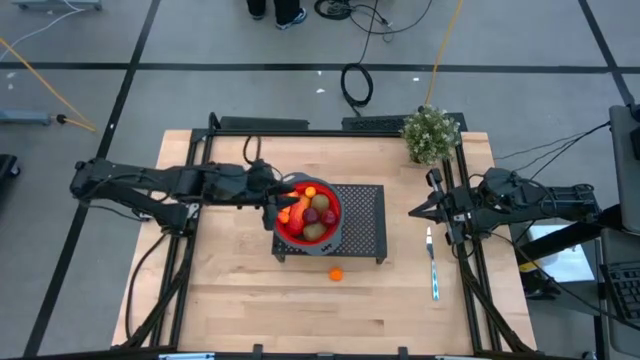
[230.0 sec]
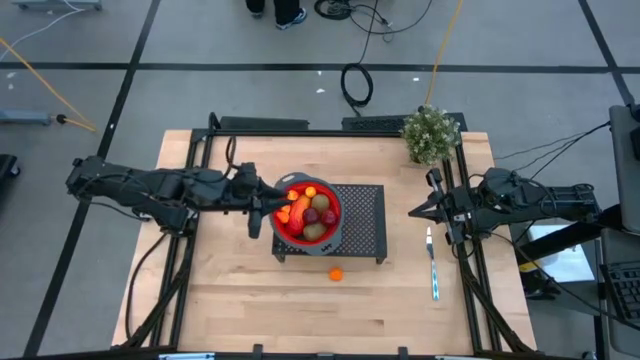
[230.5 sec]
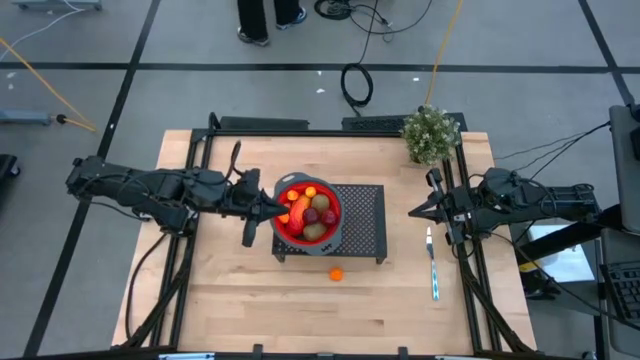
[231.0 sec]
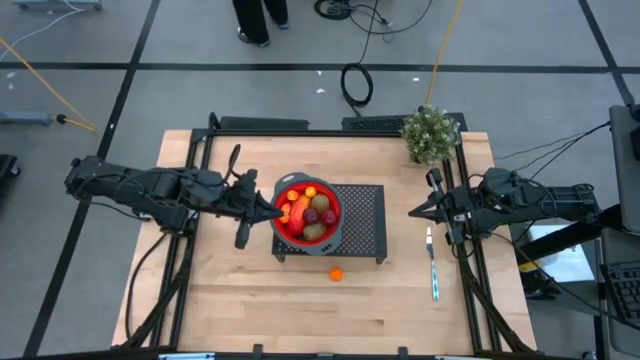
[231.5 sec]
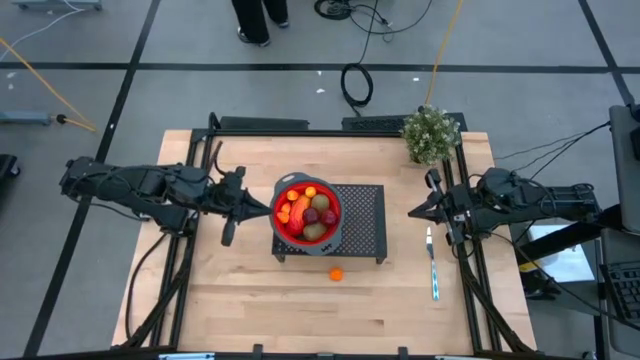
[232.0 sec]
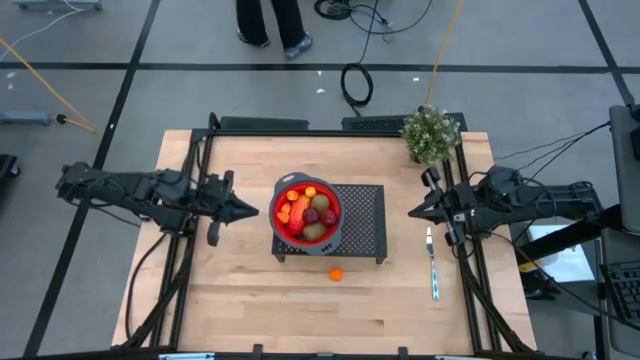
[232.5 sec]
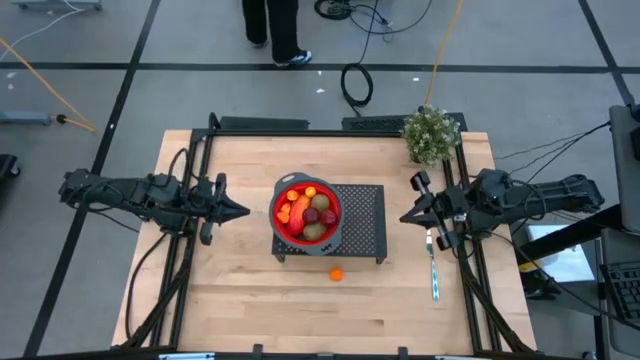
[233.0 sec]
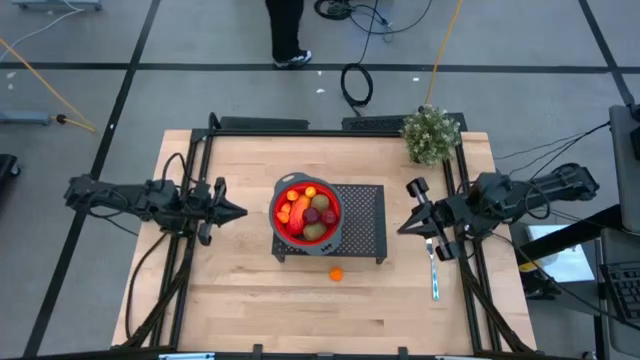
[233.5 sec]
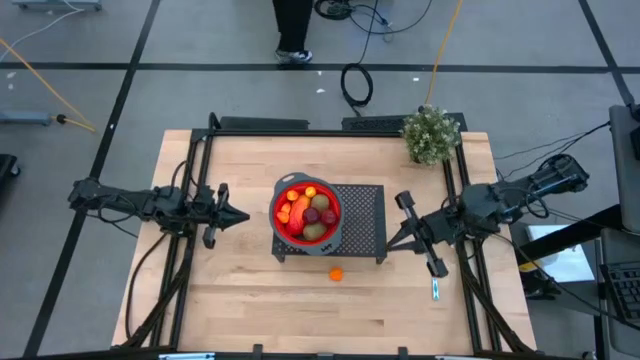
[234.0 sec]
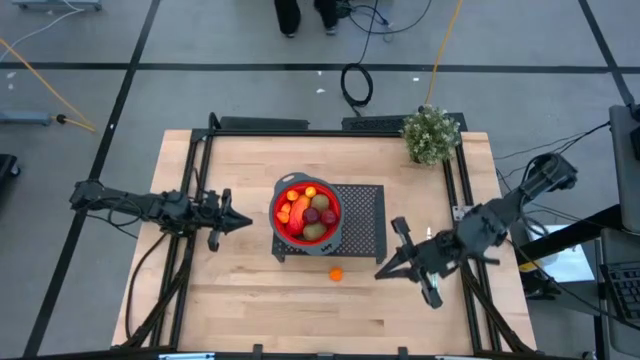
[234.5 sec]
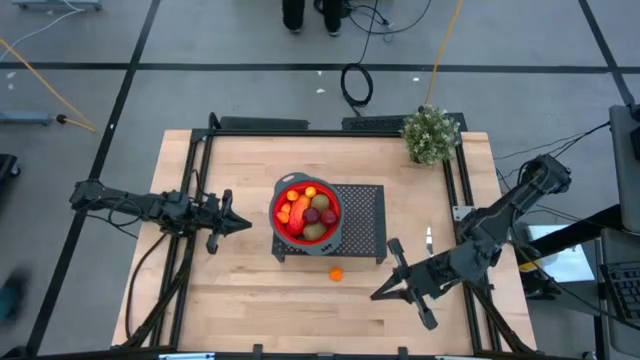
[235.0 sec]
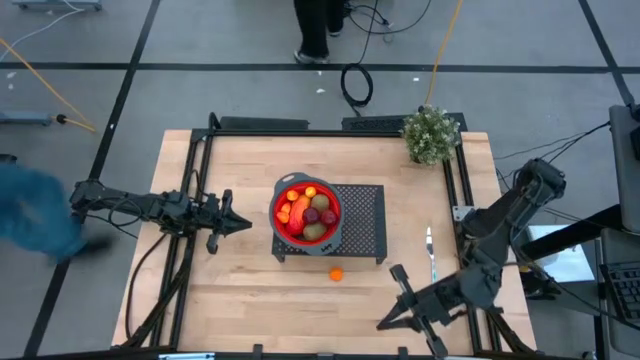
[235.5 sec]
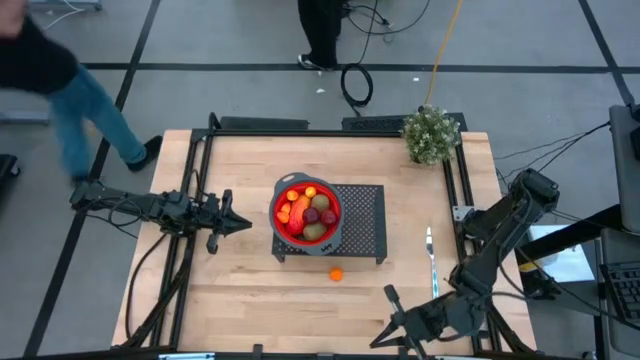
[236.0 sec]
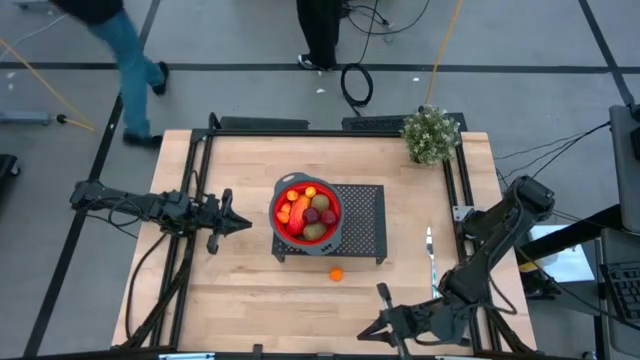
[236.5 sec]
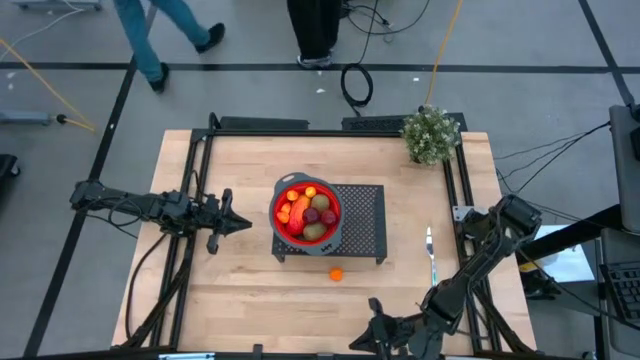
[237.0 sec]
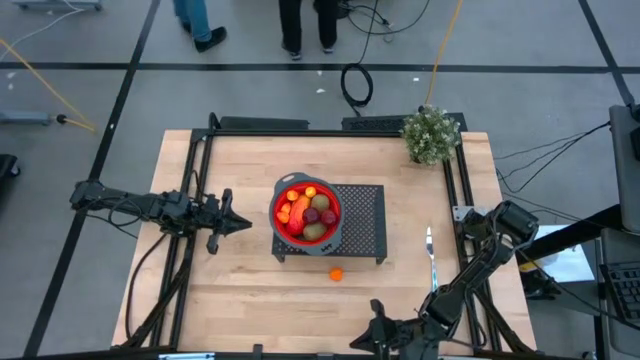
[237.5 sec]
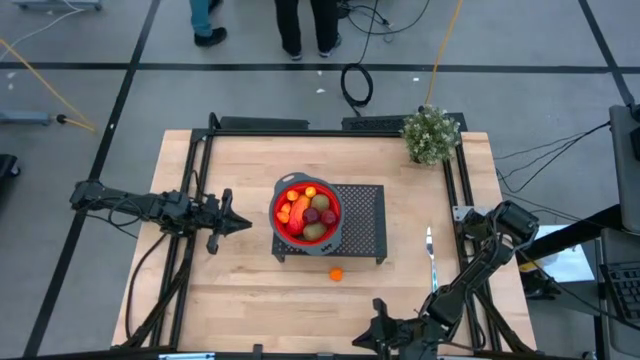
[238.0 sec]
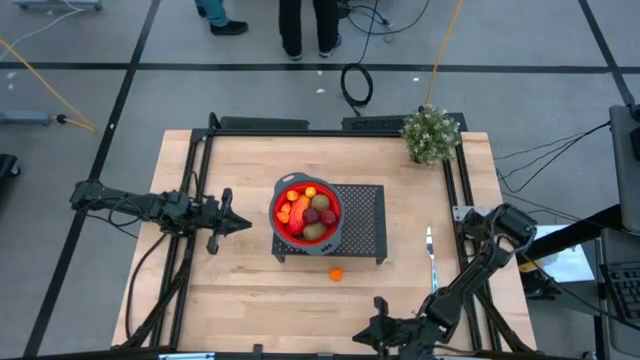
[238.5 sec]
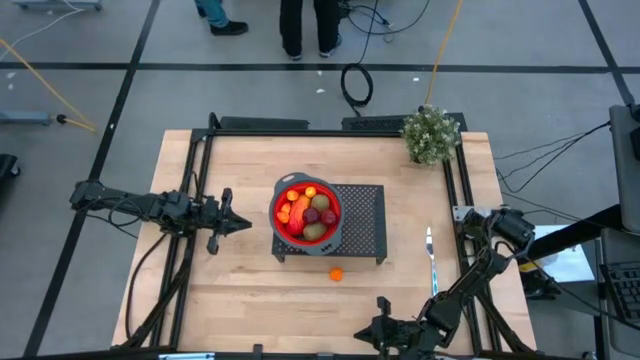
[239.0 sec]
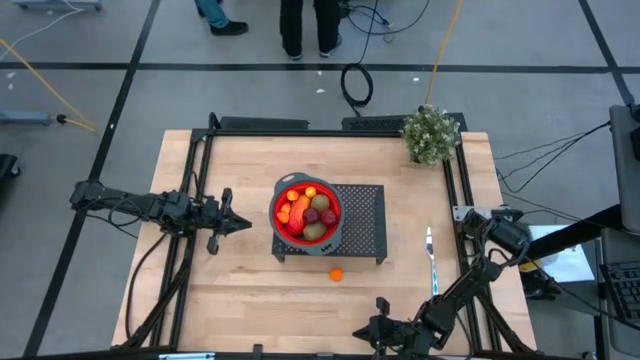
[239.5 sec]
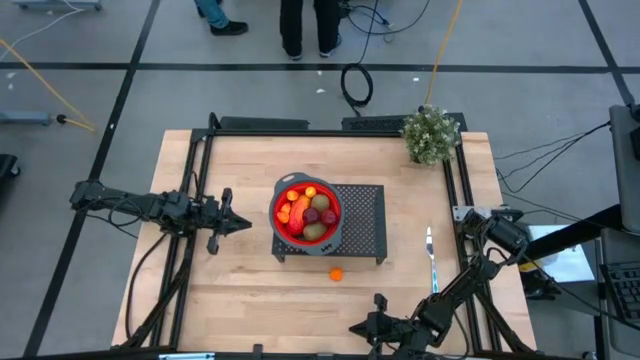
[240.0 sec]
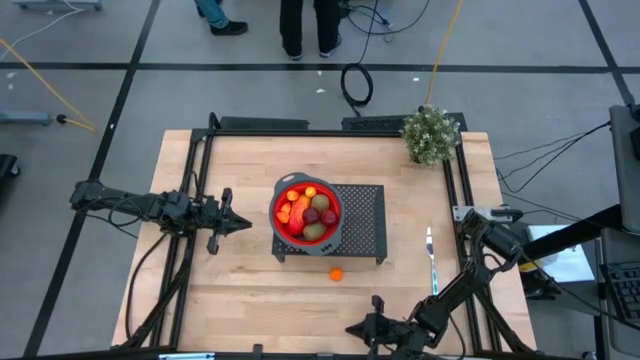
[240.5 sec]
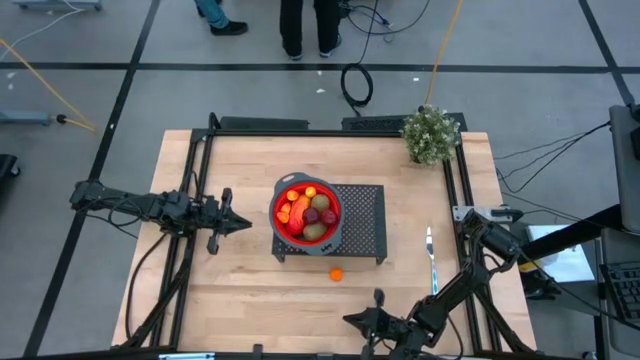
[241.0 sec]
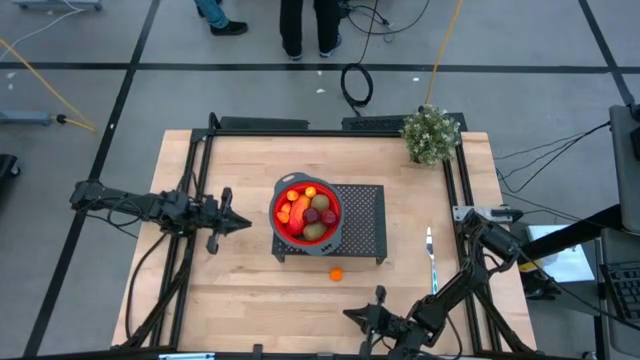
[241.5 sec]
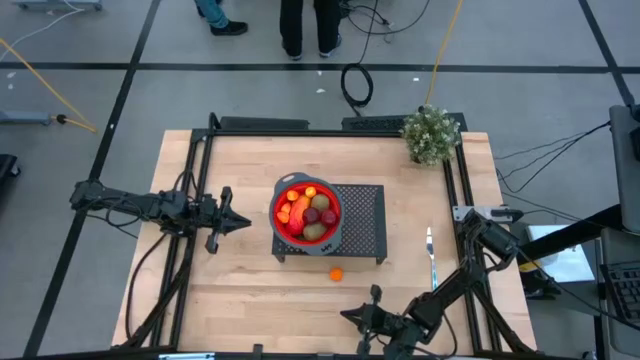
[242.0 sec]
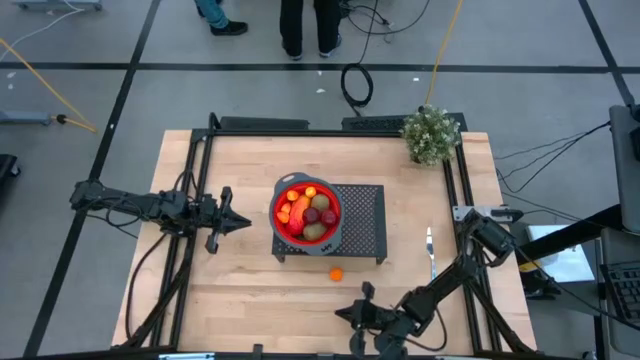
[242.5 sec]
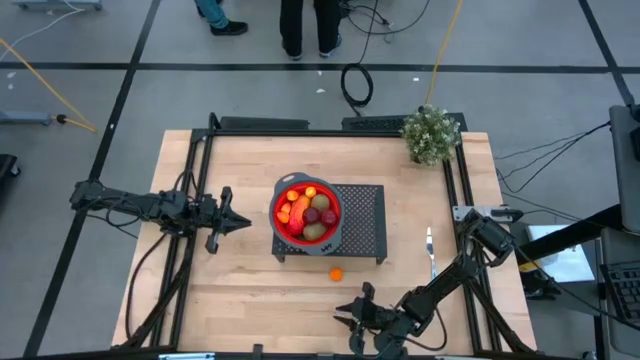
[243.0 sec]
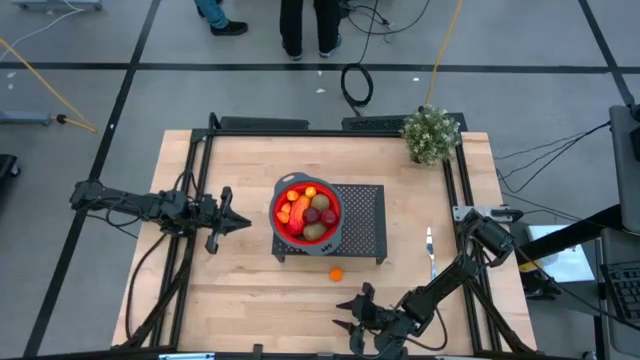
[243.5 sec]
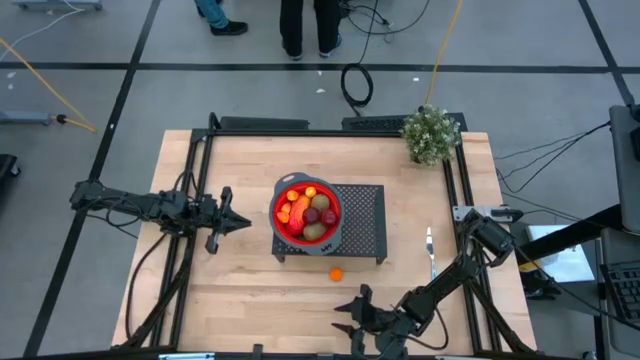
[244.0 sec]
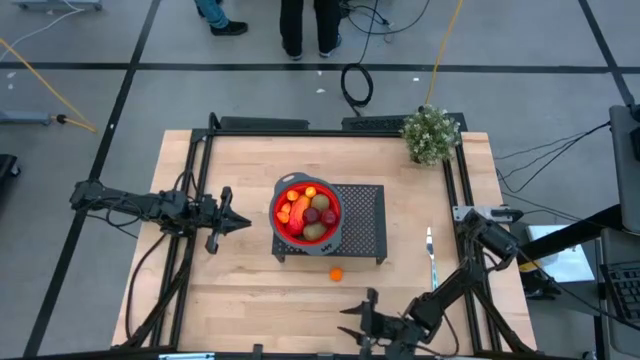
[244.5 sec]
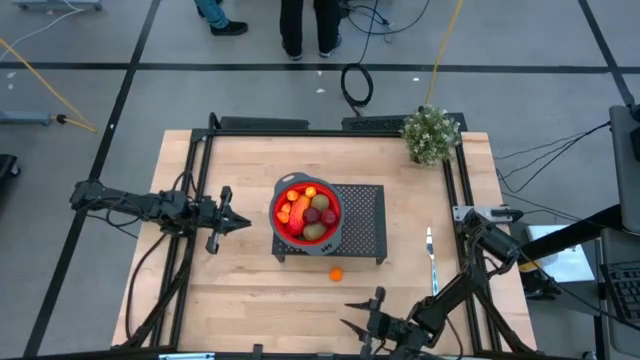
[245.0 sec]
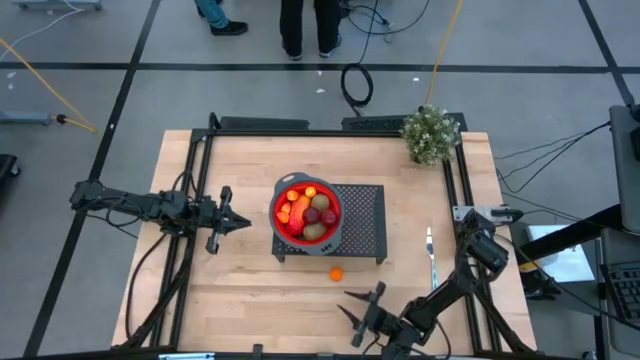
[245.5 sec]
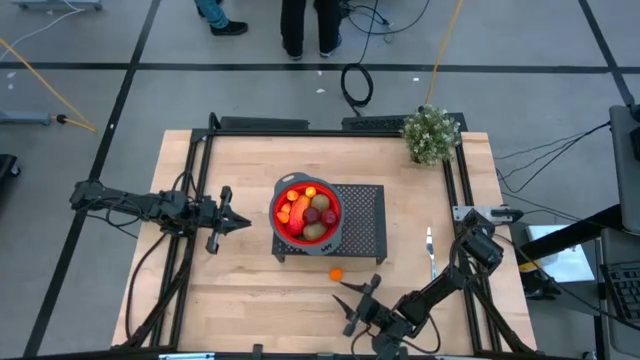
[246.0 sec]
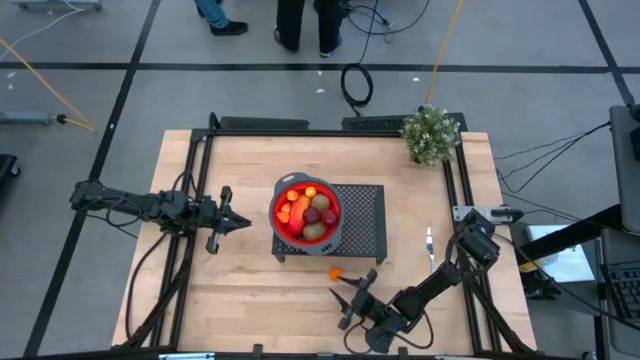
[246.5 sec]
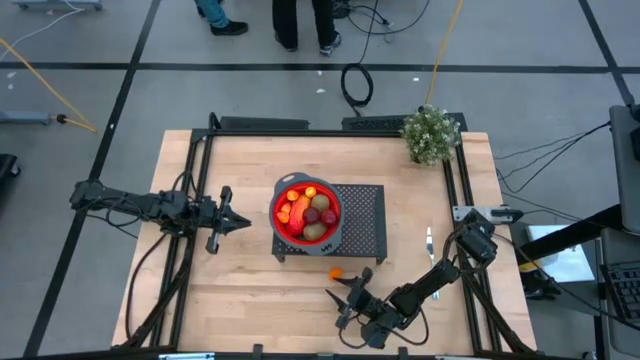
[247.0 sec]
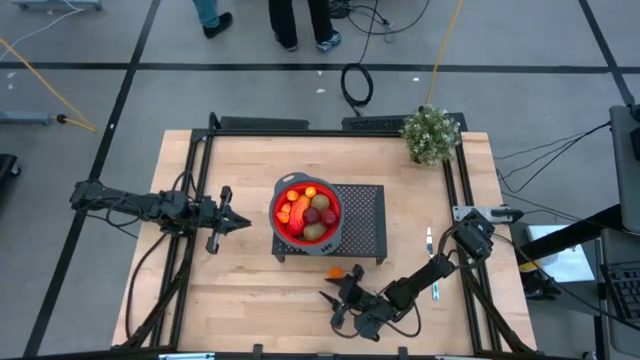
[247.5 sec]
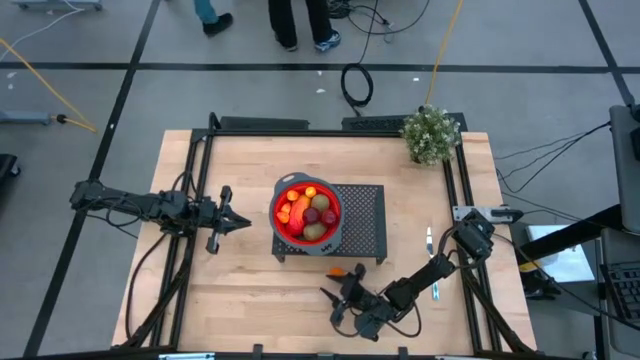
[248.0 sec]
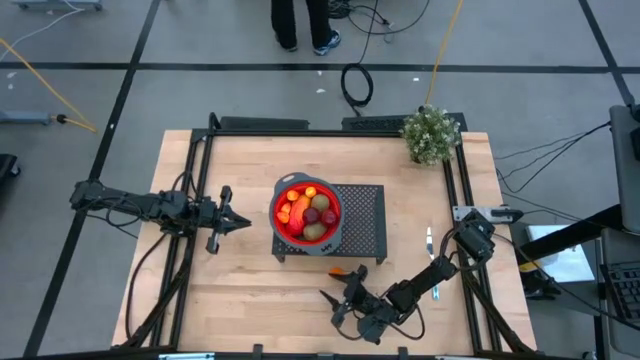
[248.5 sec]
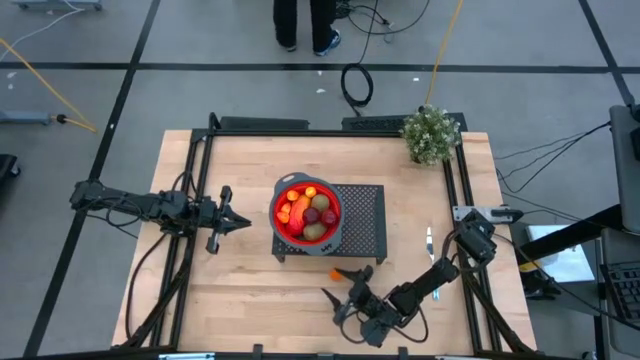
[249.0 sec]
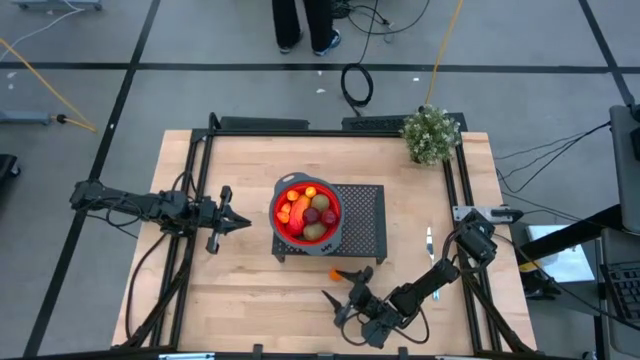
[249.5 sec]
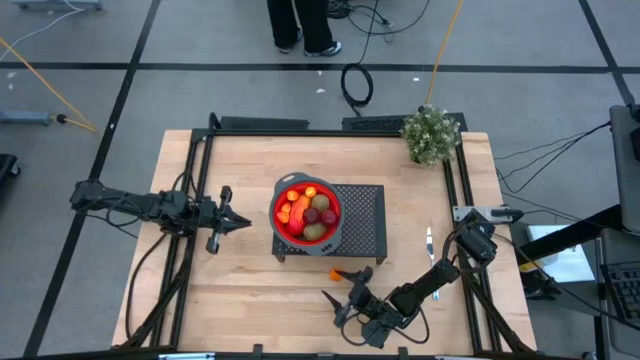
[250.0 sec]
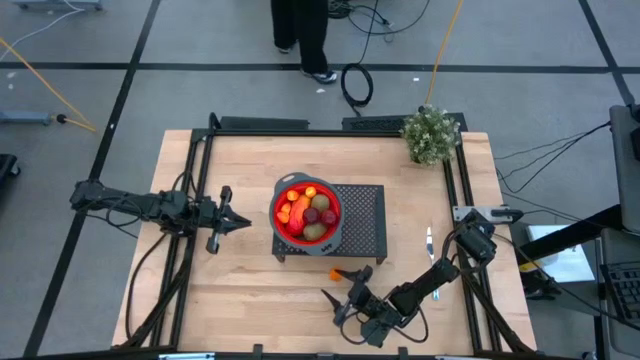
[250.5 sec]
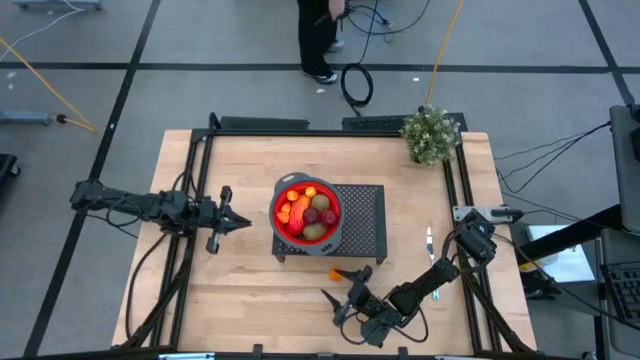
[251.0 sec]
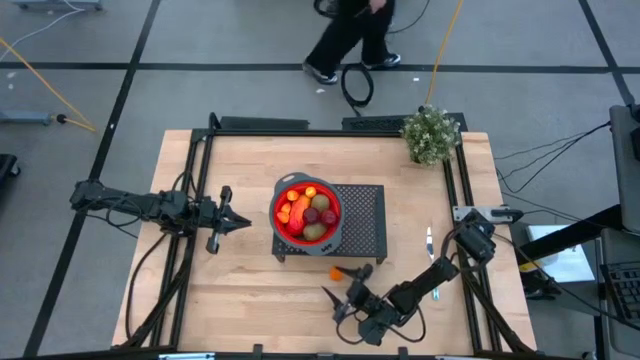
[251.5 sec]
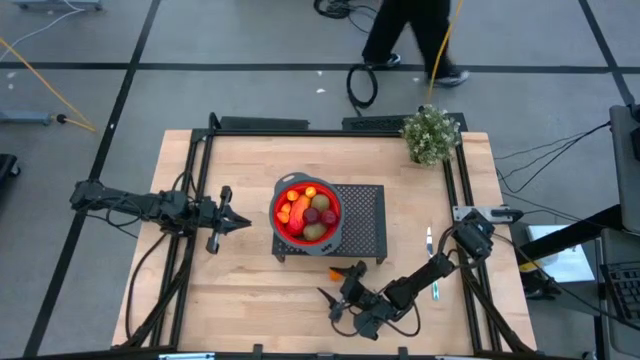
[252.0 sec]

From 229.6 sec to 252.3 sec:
Task: Pick & Place Fruit
Put the tangerine into the red colander on the shelf

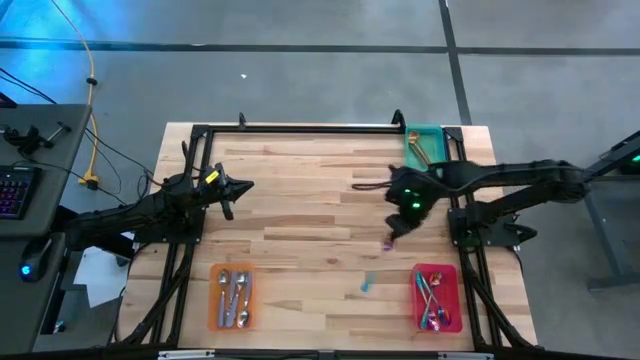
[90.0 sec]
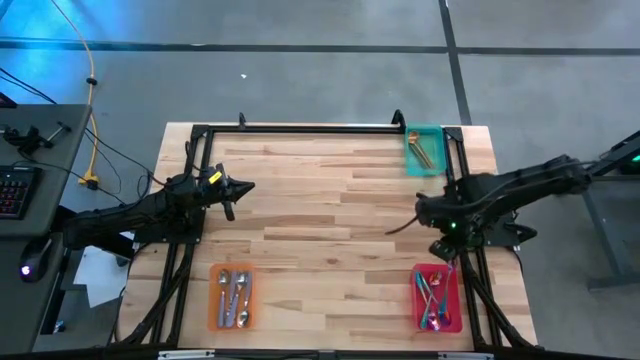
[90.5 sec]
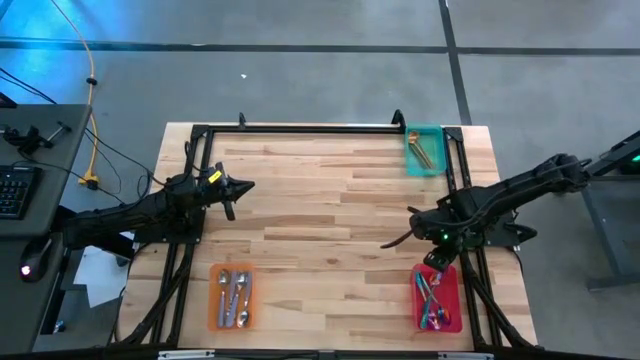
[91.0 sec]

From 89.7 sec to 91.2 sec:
Task: Sort silverware by color (type)
Put the blue spoon into the red bin
